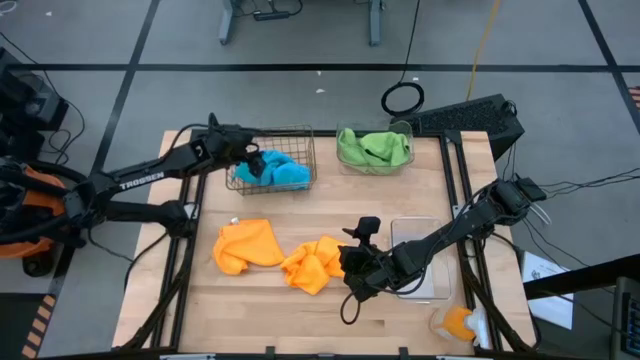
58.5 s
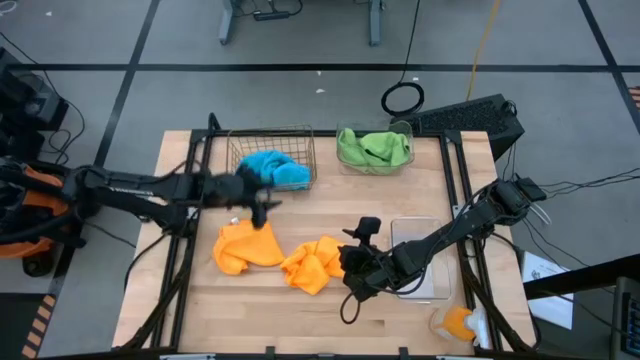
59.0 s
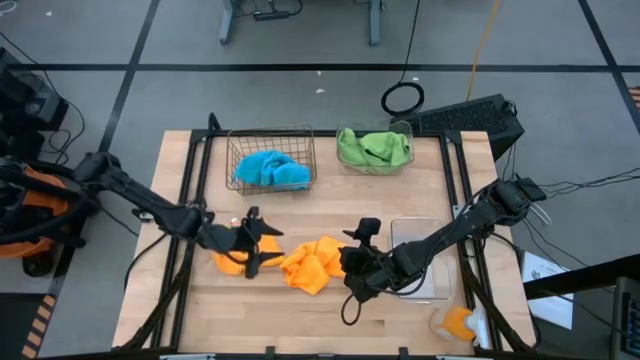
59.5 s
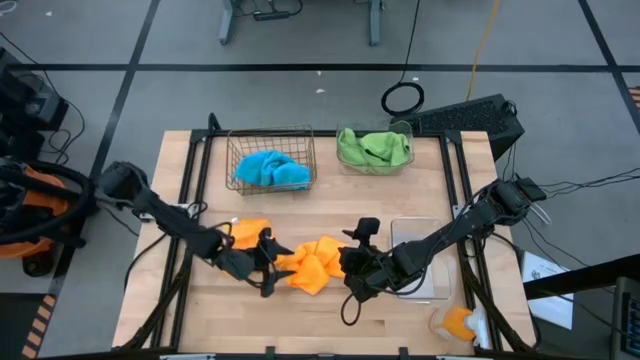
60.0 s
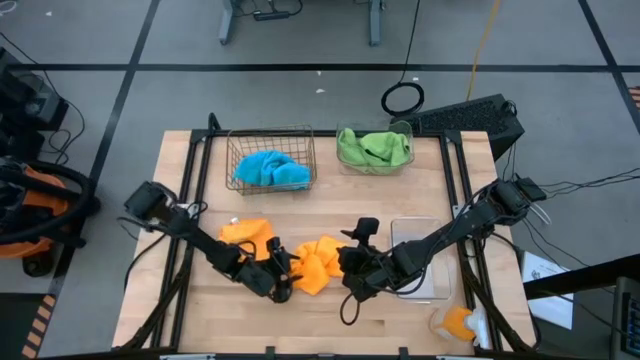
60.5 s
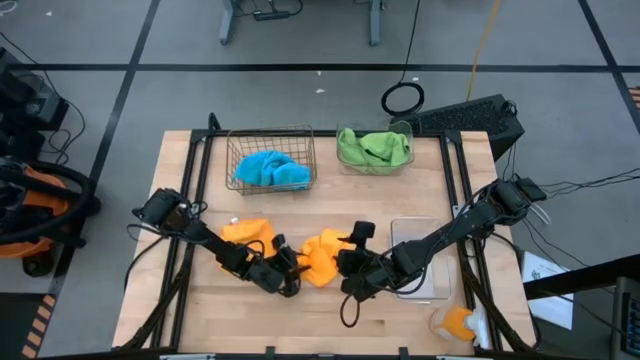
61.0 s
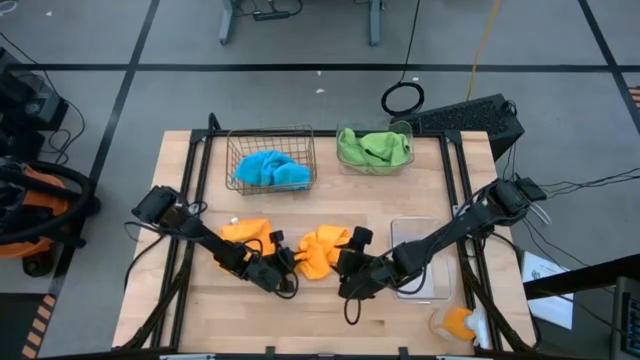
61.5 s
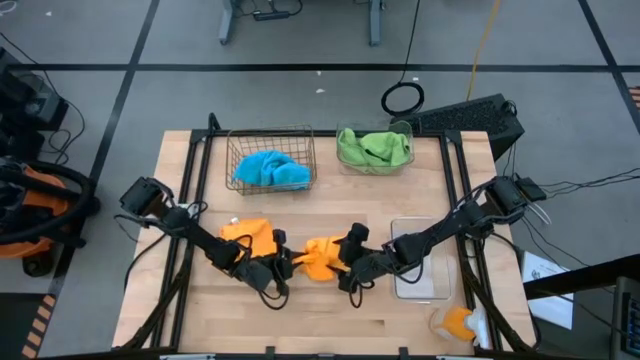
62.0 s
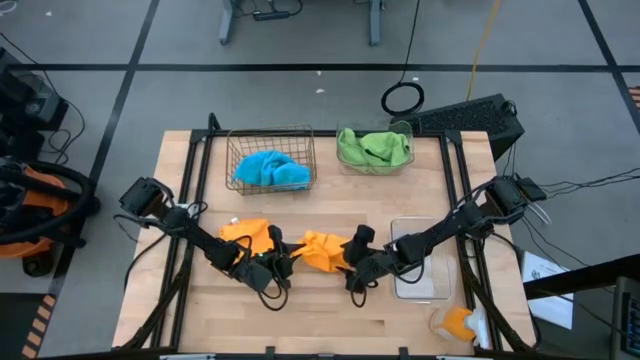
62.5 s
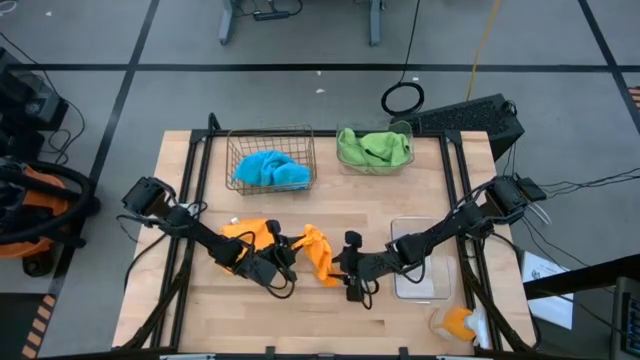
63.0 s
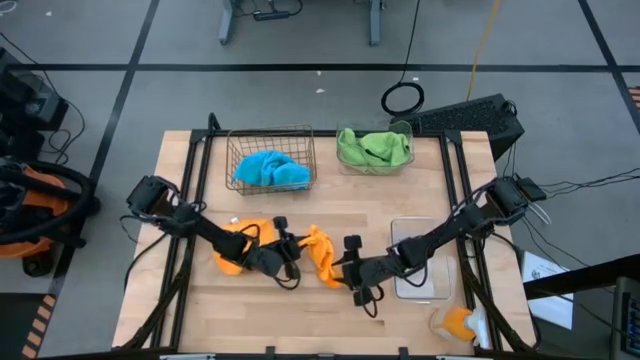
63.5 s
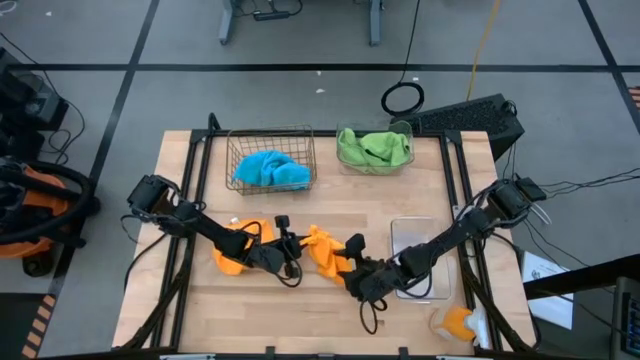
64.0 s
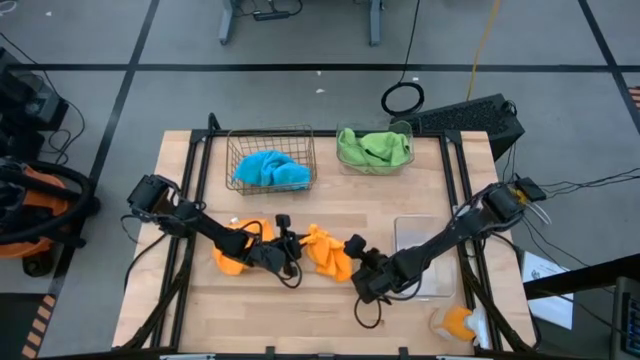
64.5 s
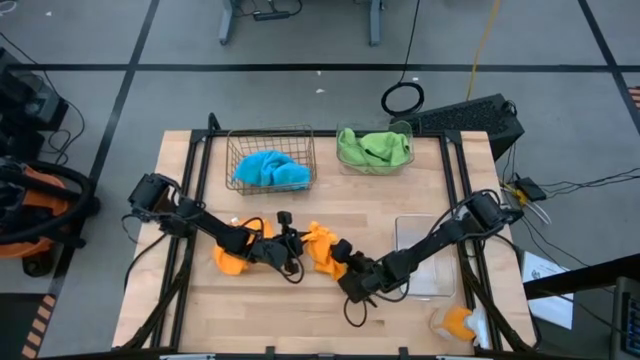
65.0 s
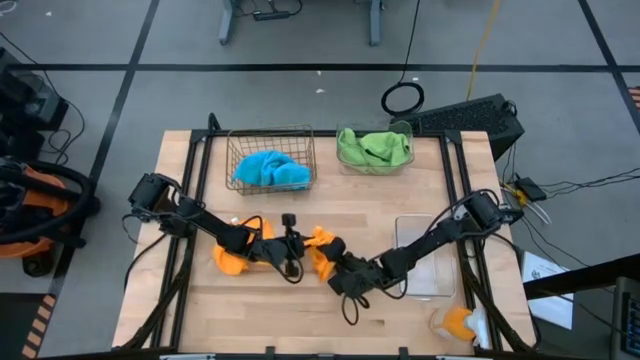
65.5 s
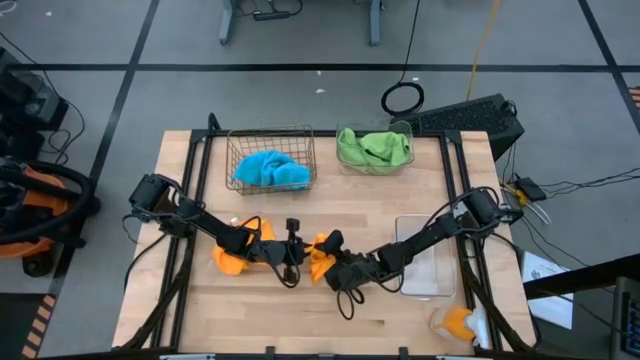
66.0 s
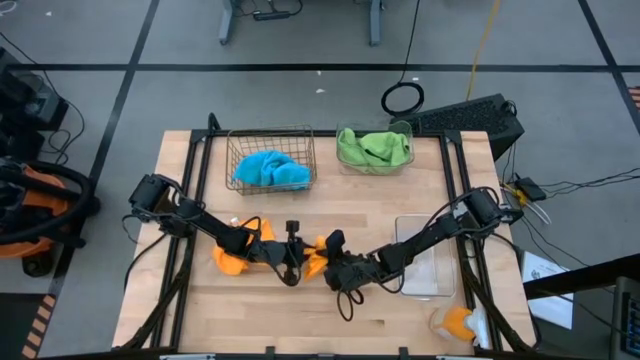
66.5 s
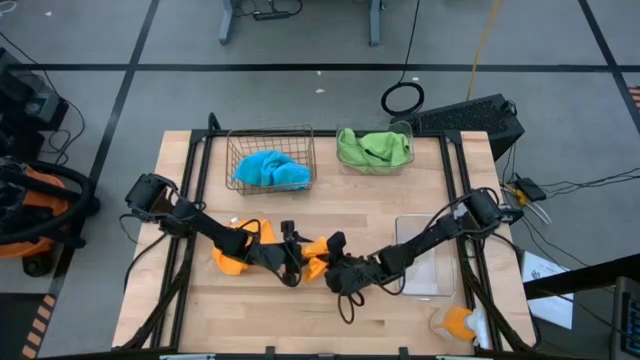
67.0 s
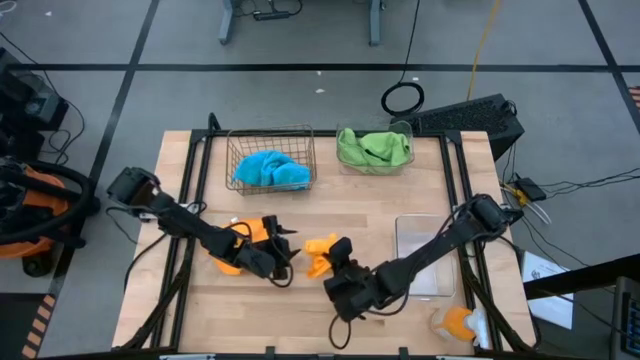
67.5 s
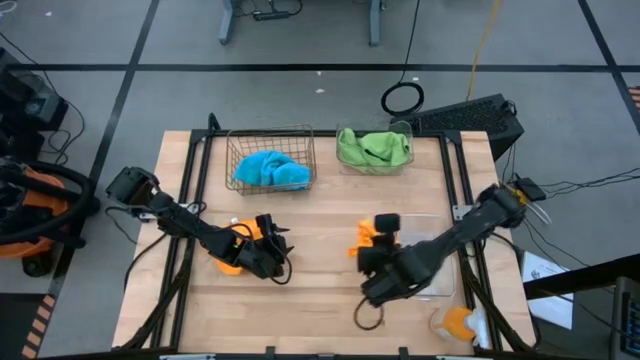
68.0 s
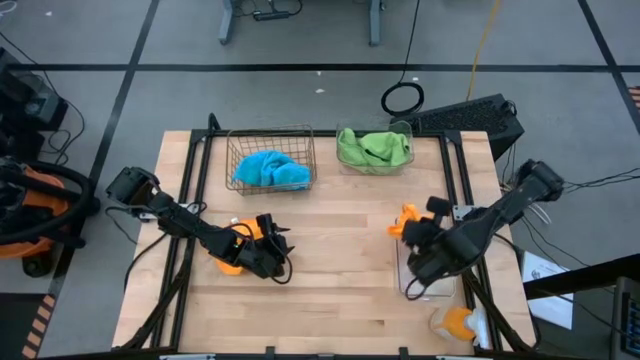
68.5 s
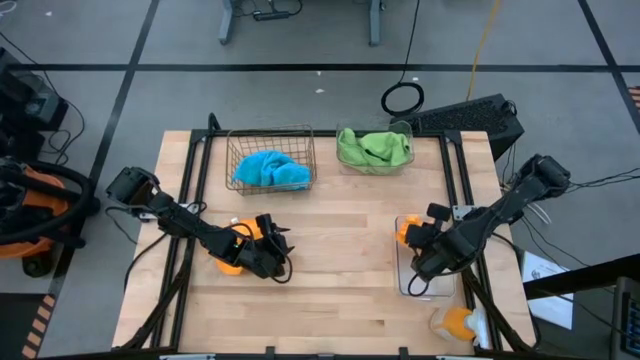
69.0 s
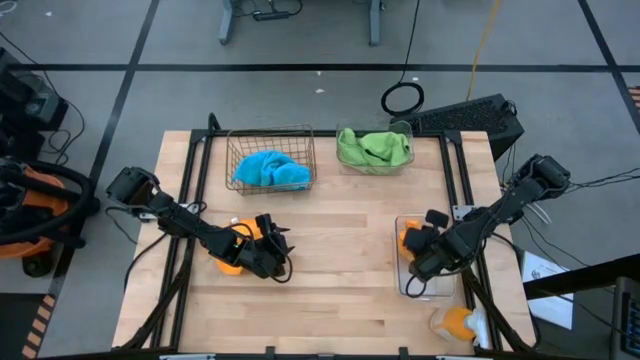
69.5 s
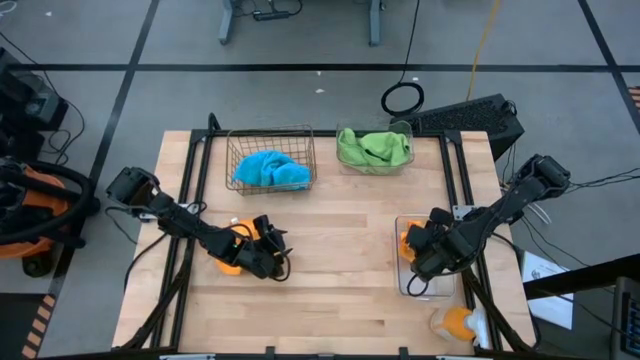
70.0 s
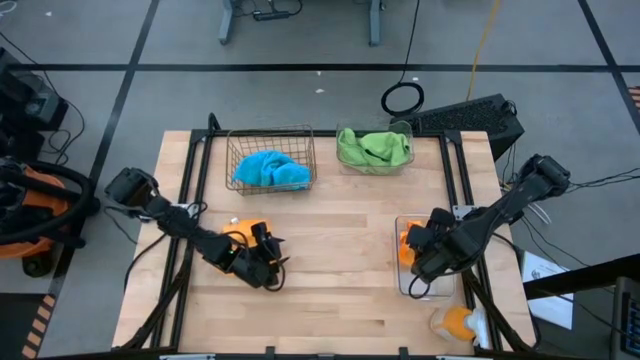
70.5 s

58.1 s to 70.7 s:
Task: Sort microfiber towel by color & place in baskets
Put the right orange microfiber towel into the bottom transparent bin

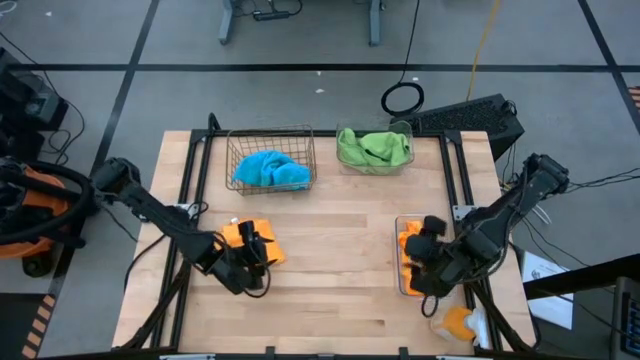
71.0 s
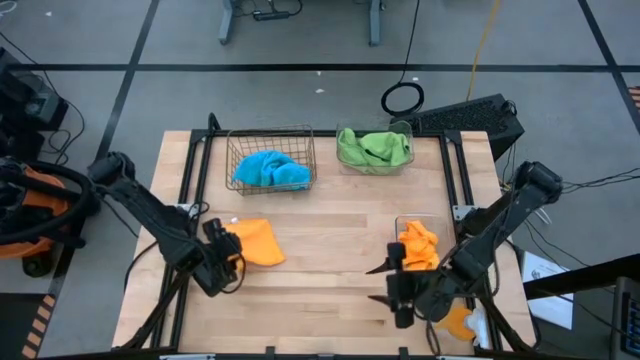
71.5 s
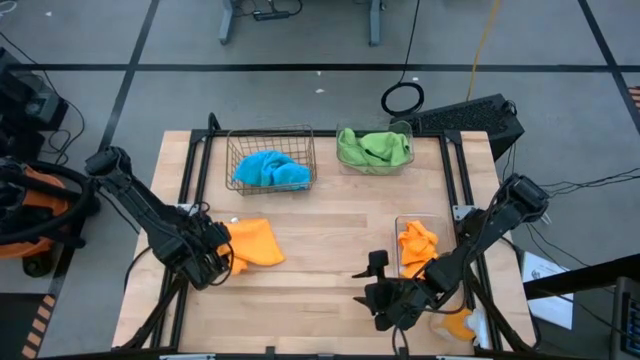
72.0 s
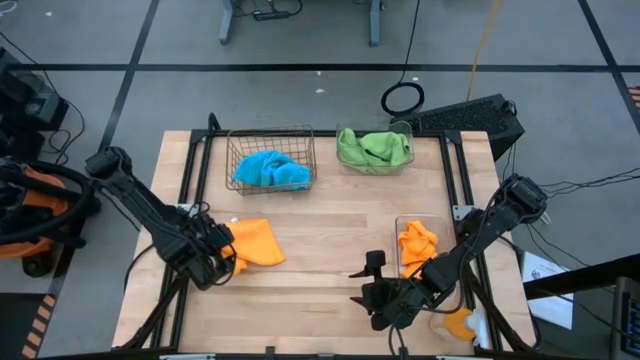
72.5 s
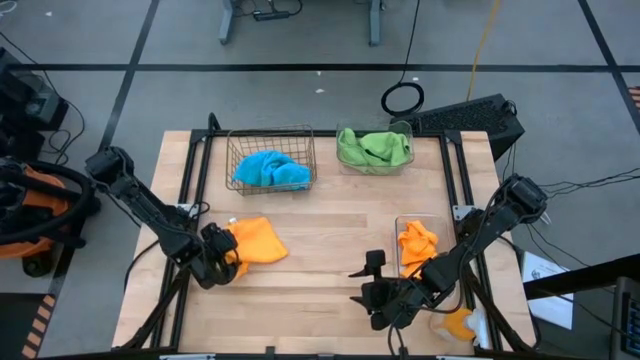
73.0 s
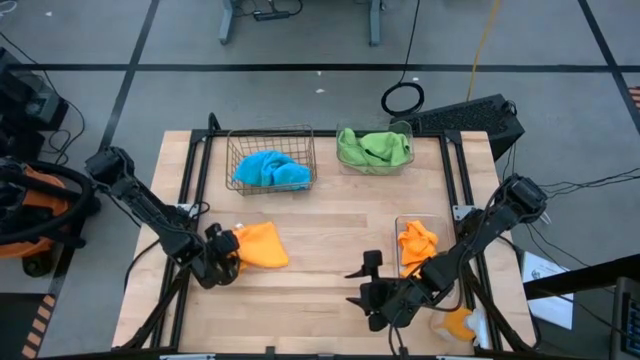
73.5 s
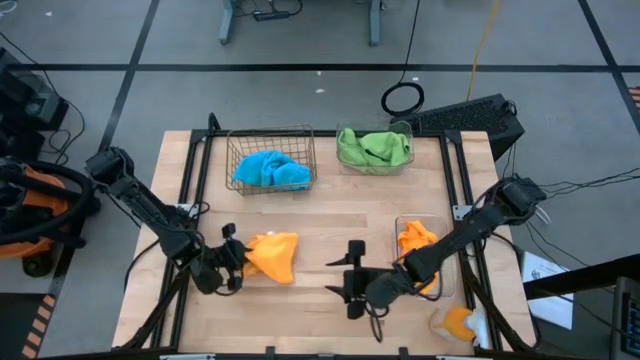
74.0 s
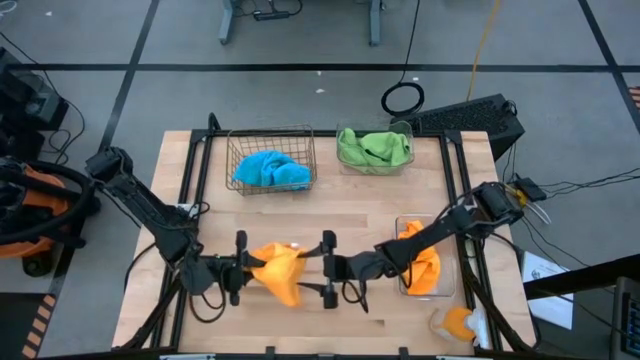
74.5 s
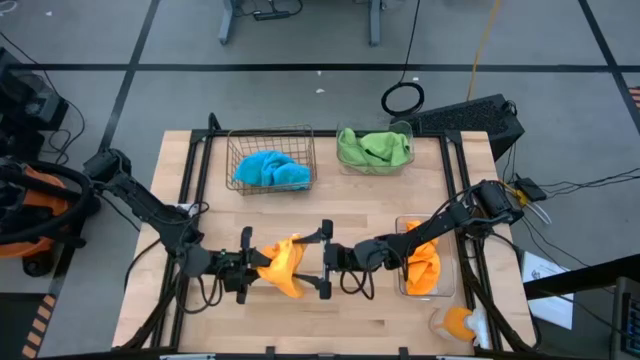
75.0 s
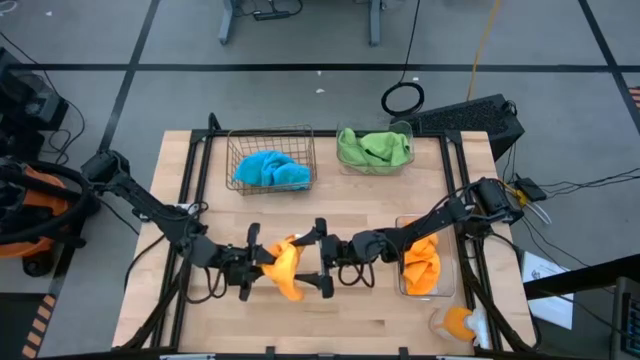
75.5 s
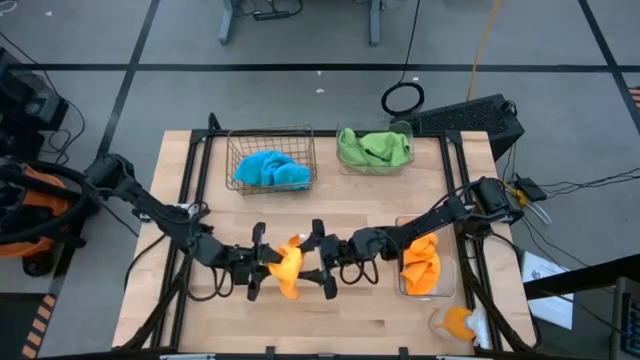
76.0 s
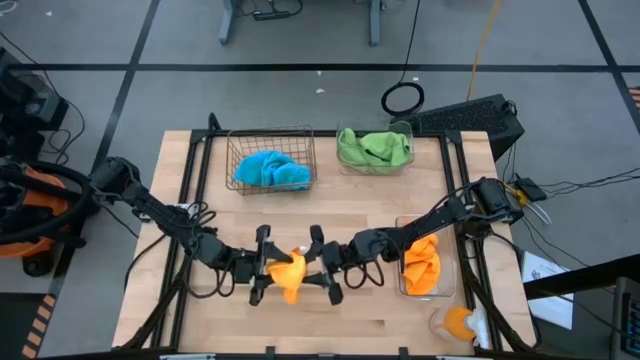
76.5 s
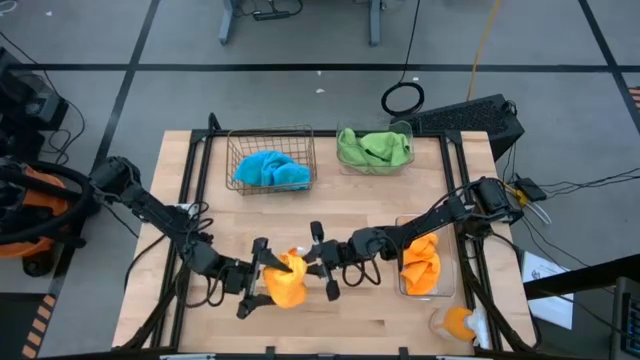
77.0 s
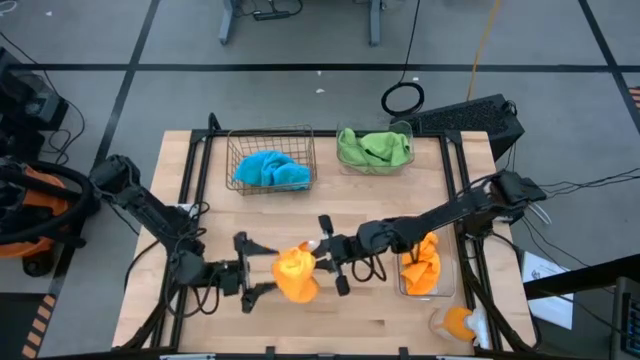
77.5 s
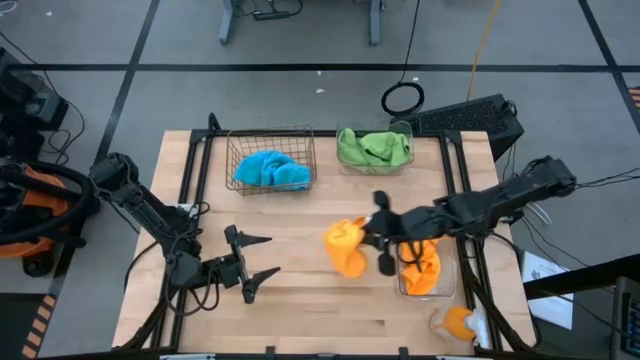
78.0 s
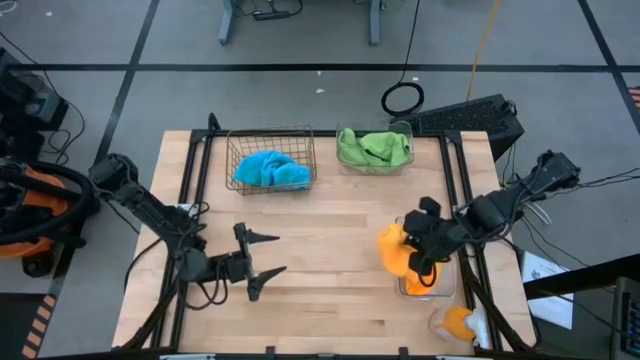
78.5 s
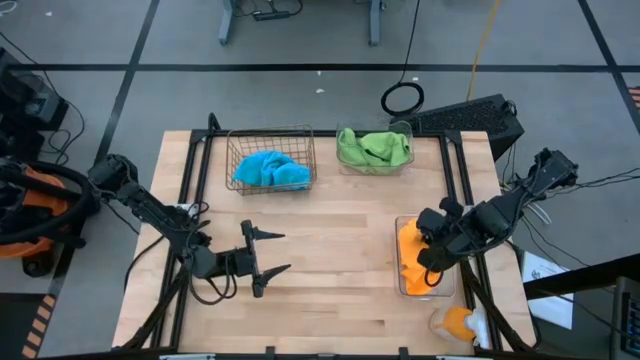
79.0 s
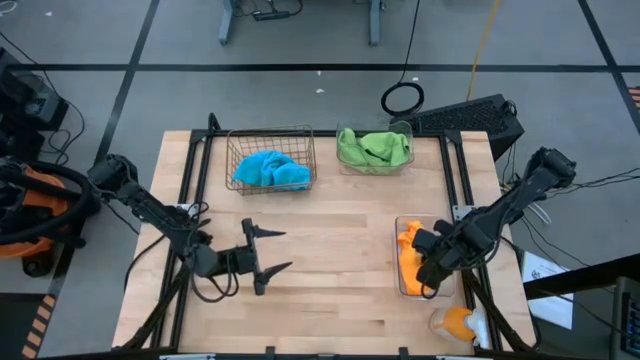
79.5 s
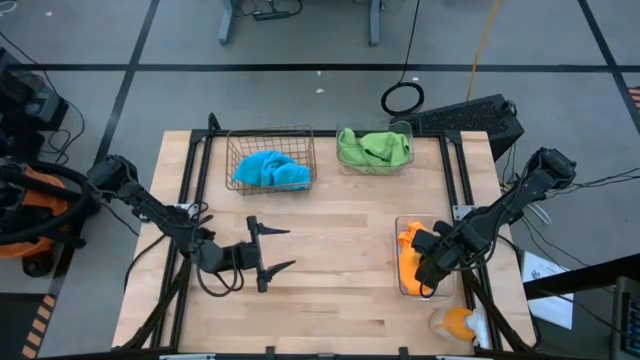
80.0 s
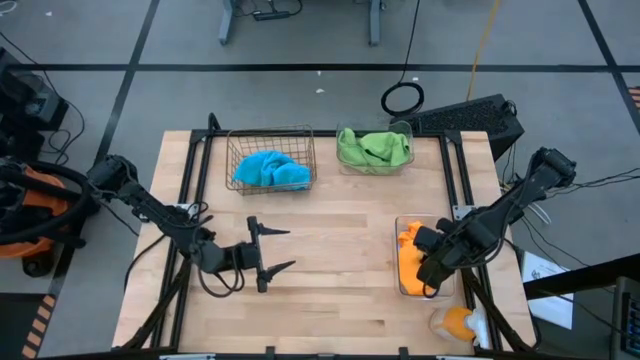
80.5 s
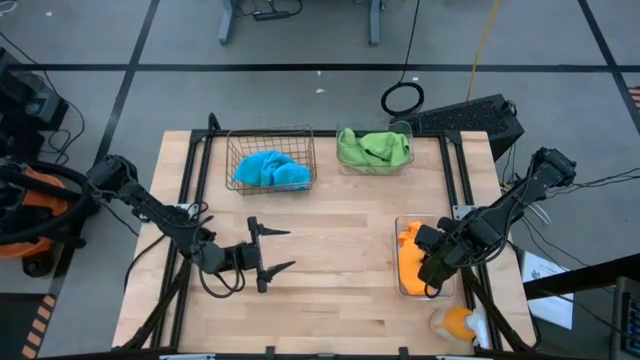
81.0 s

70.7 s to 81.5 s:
Put the orange microfiber towel into the bottom transparent bin
